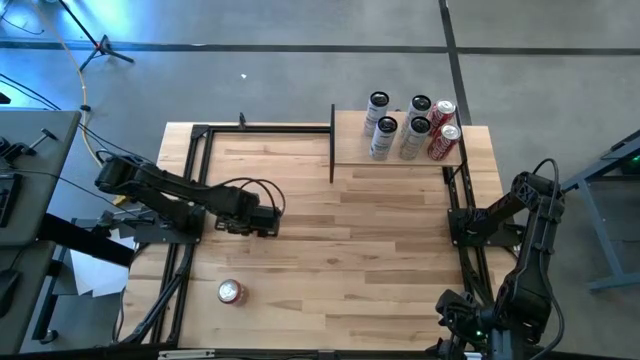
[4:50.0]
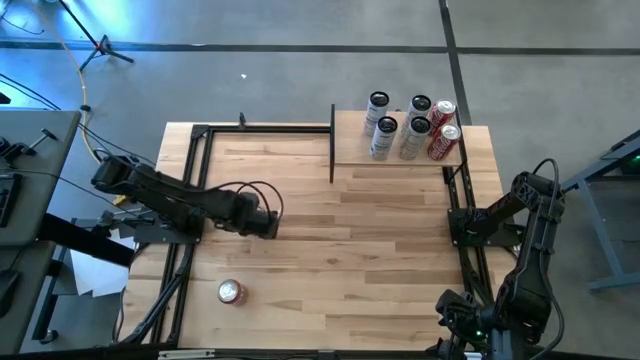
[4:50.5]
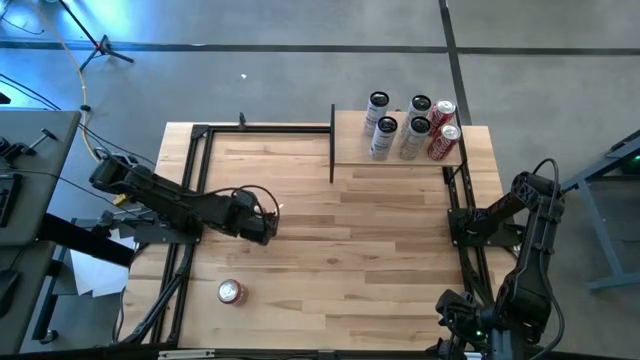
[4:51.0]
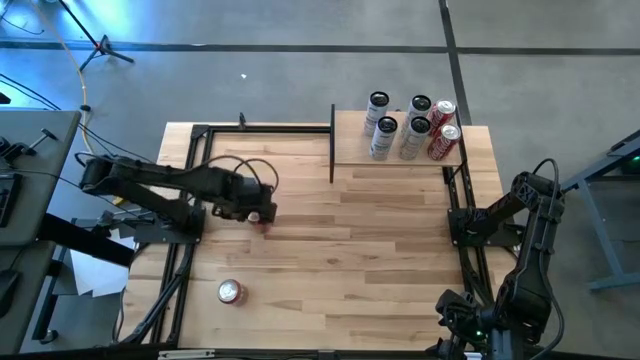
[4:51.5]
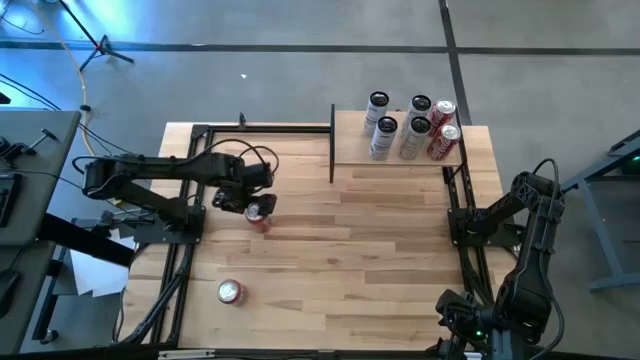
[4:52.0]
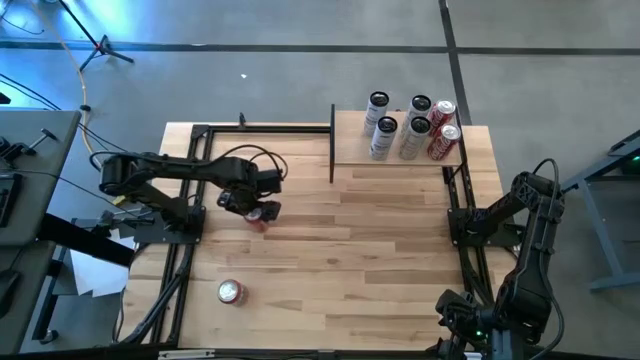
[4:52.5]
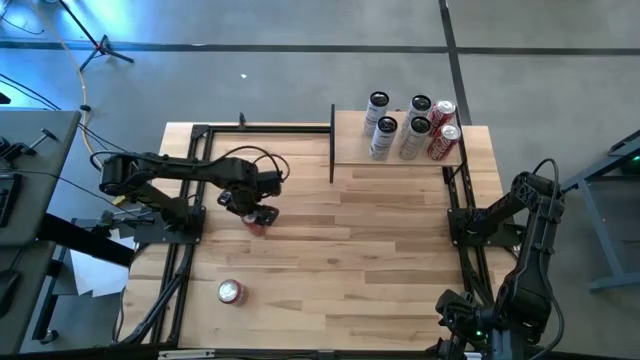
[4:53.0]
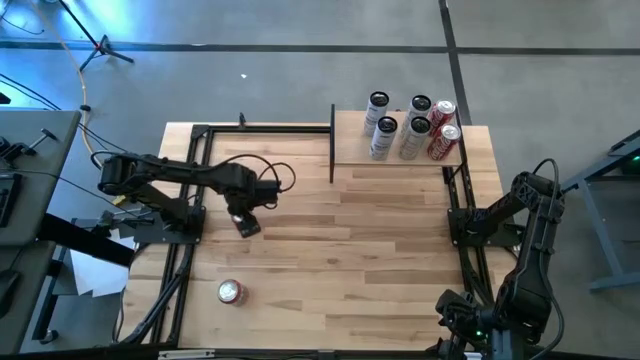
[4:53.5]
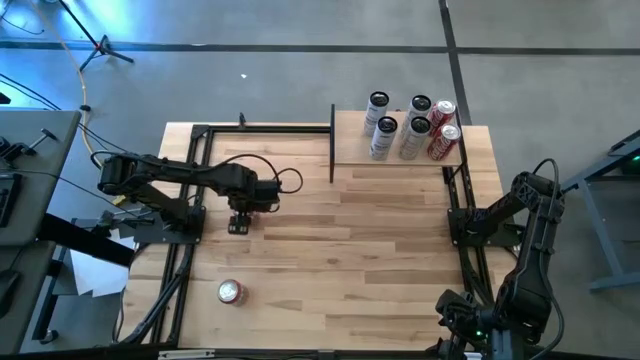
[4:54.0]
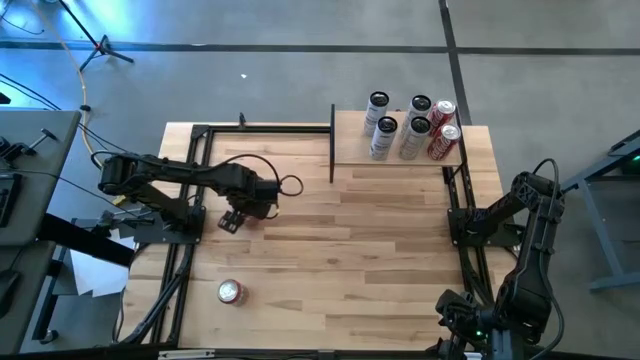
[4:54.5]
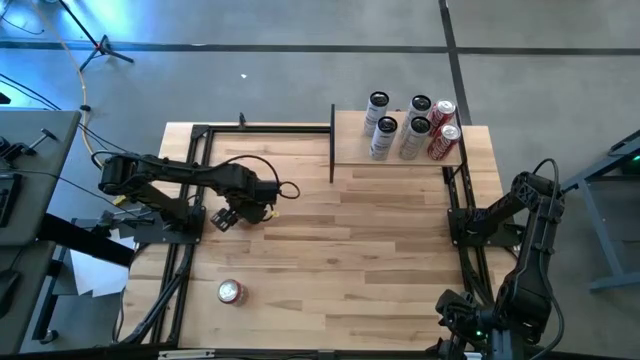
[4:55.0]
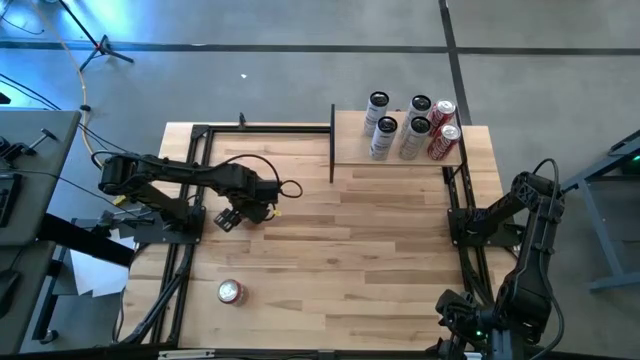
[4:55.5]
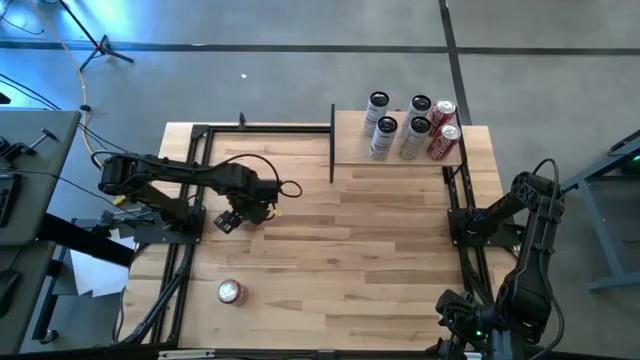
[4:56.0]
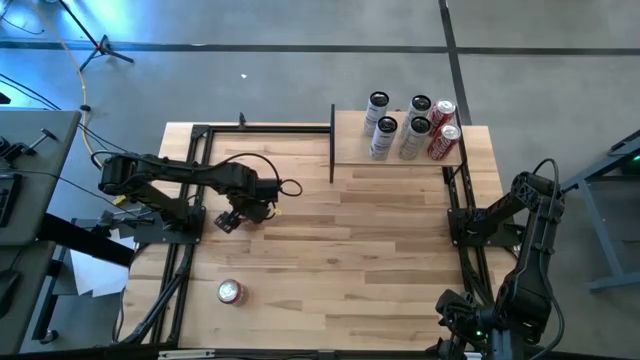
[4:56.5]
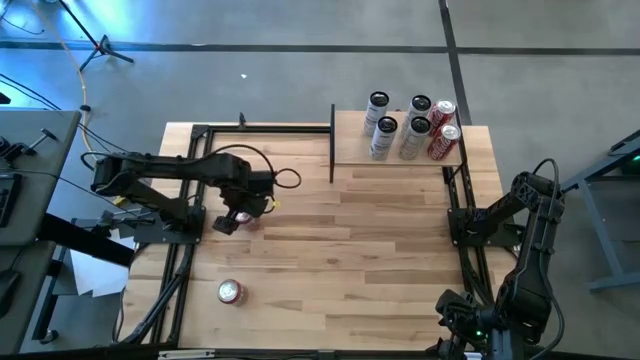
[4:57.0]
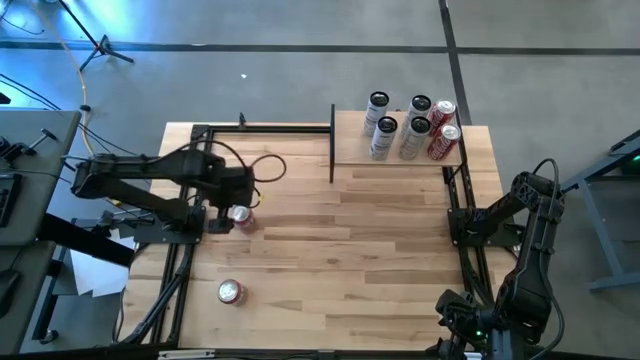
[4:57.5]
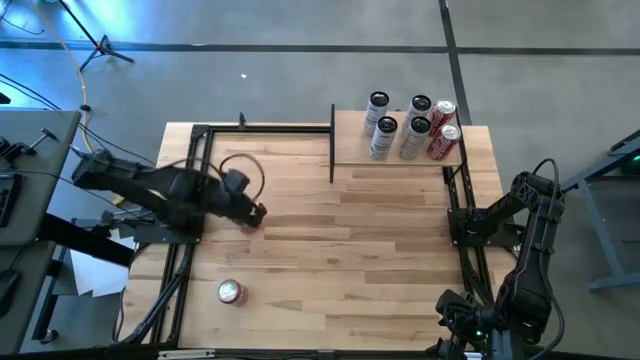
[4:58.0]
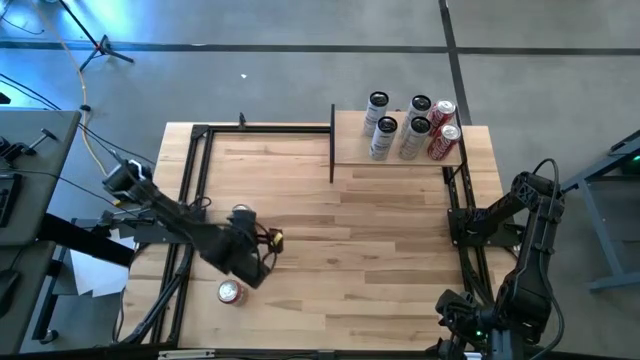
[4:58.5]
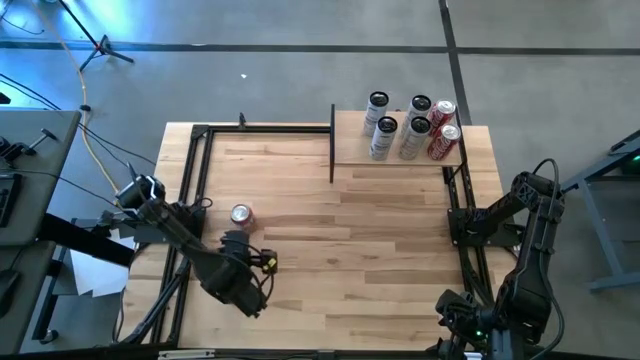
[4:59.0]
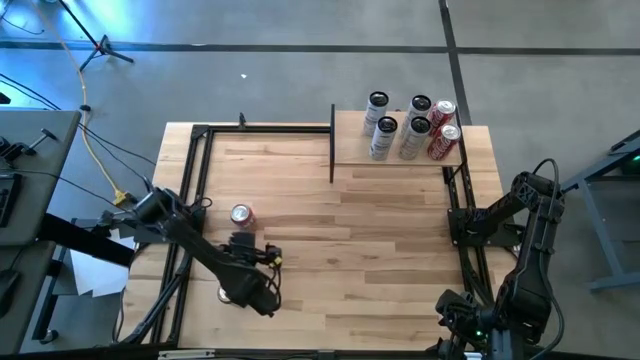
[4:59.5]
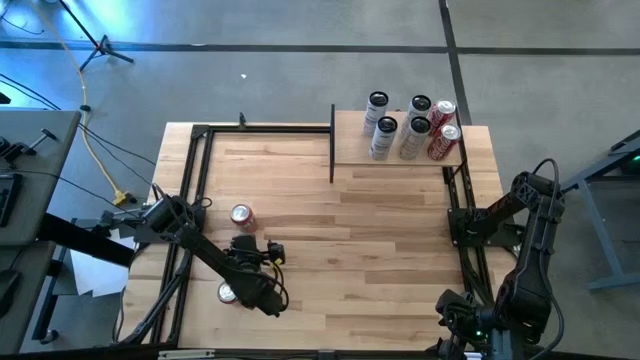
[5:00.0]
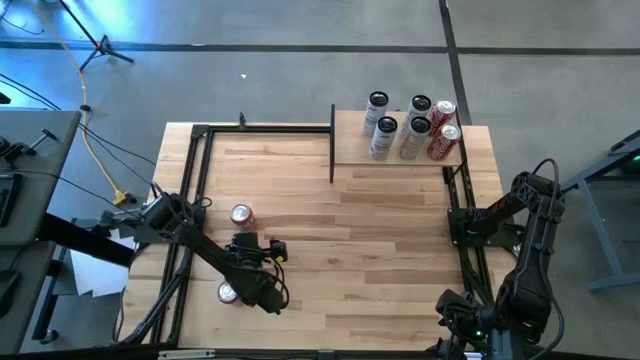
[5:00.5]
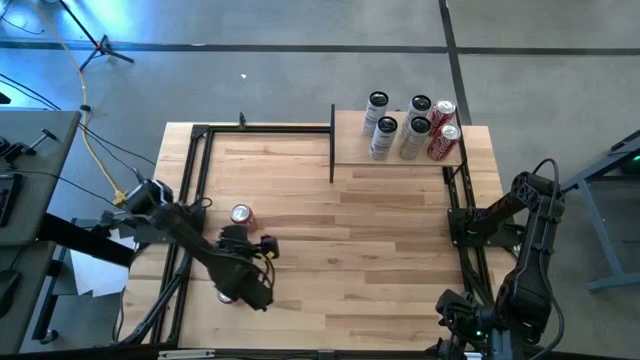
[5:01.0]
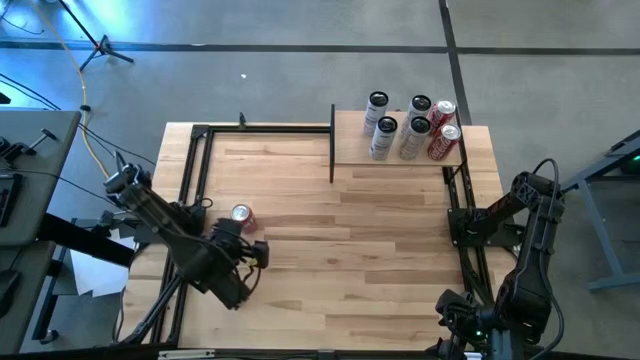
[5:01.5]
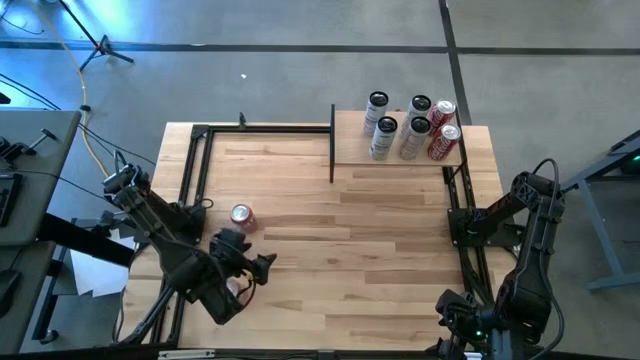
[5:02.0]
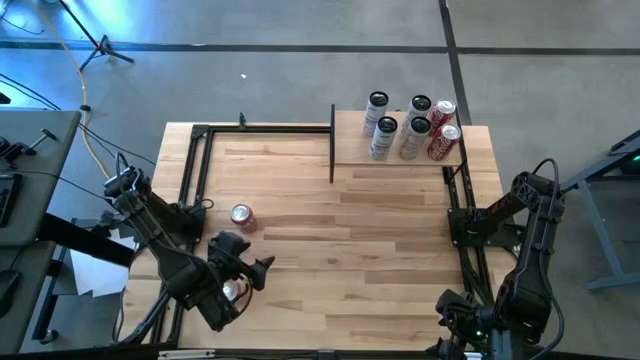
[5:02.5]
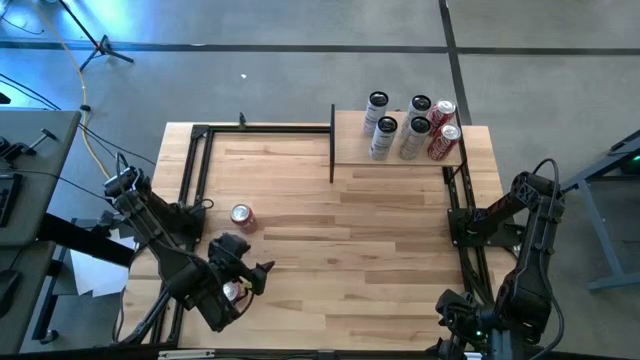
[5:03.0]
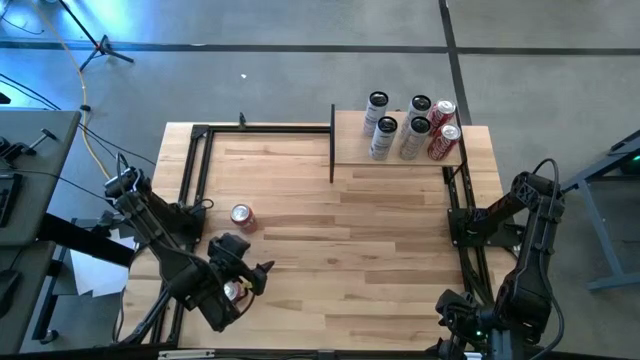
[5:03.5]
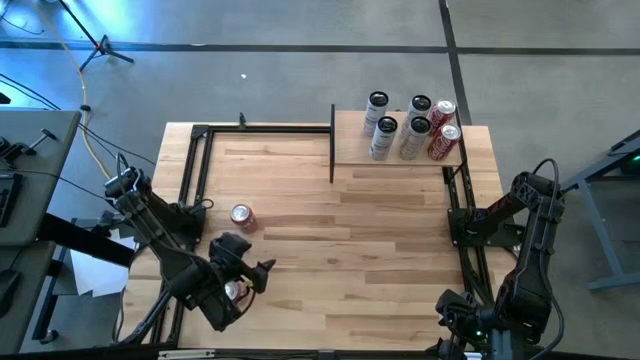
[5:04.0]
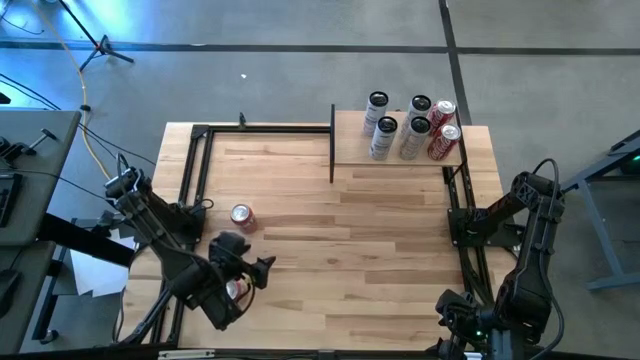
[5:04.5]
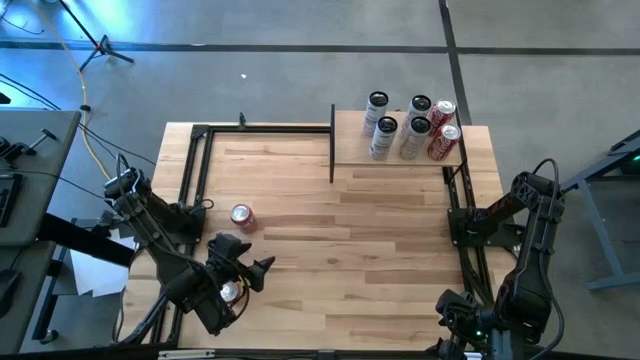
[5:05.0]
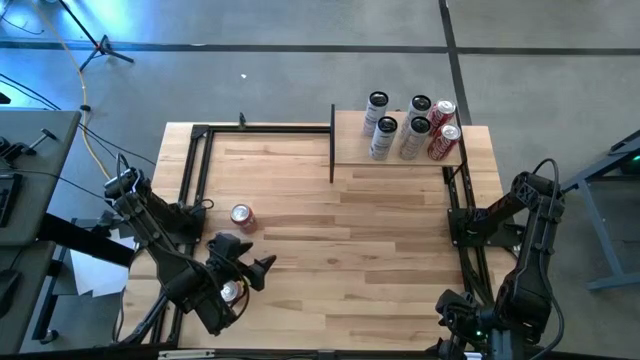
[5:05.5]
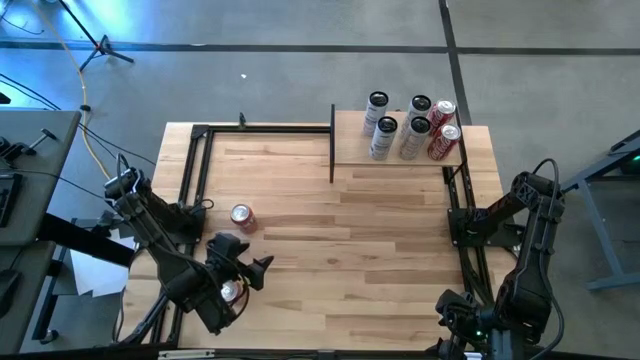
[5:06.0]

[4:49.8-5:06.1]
Task: Place canned beverage on shelf
Put the orange soda can on the shelf

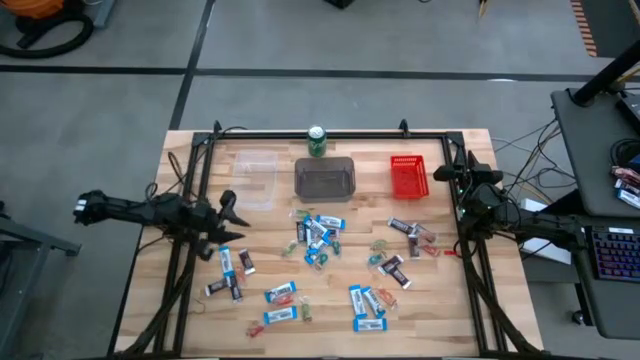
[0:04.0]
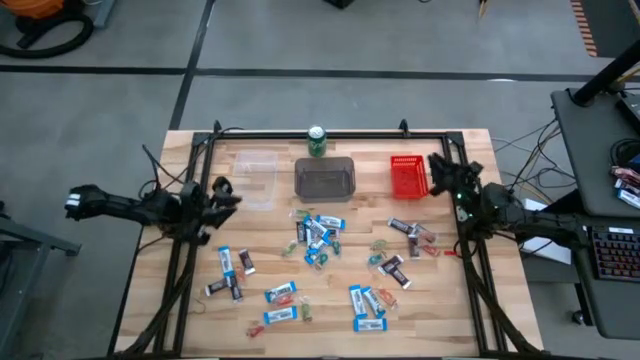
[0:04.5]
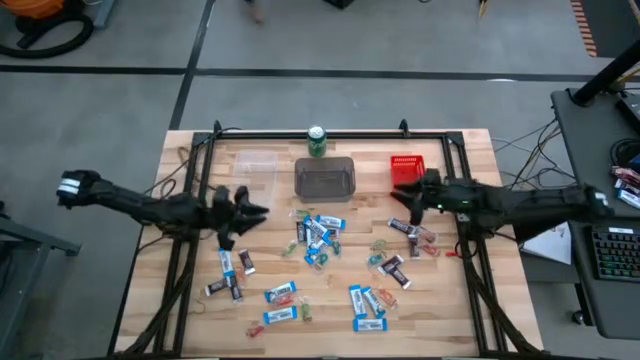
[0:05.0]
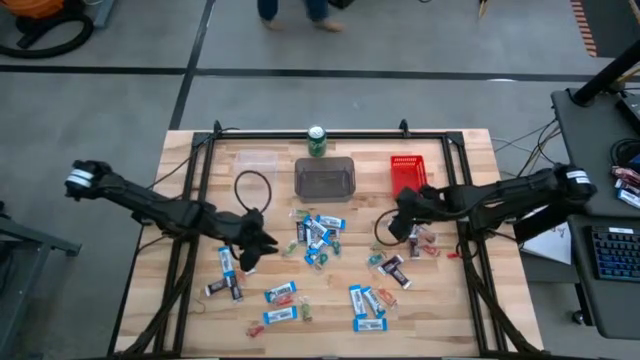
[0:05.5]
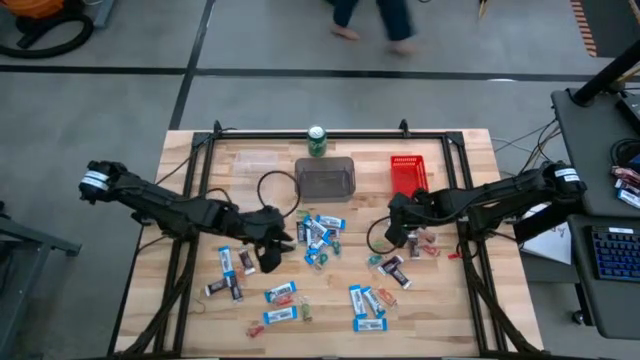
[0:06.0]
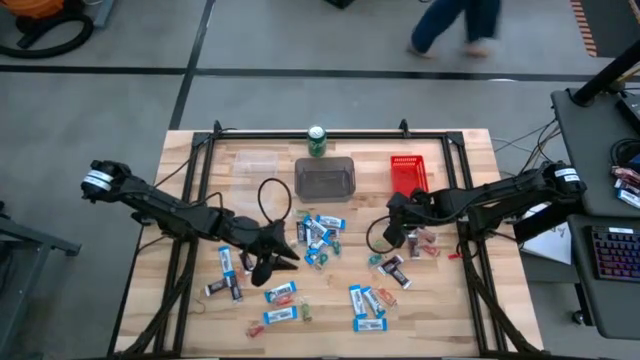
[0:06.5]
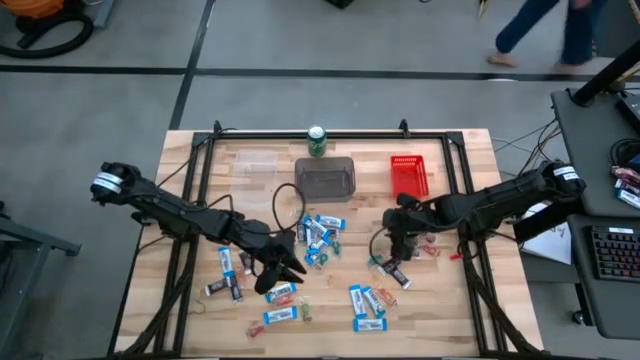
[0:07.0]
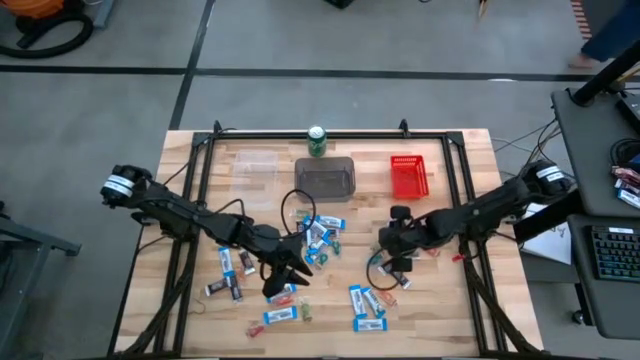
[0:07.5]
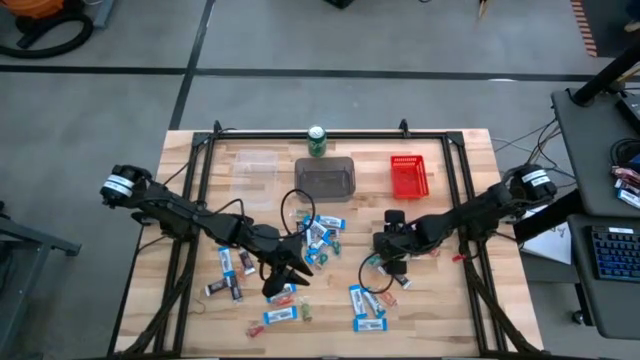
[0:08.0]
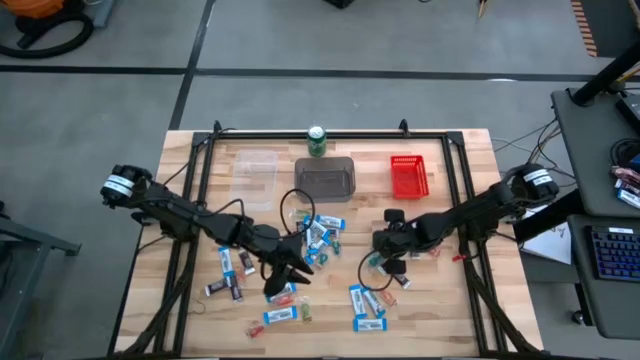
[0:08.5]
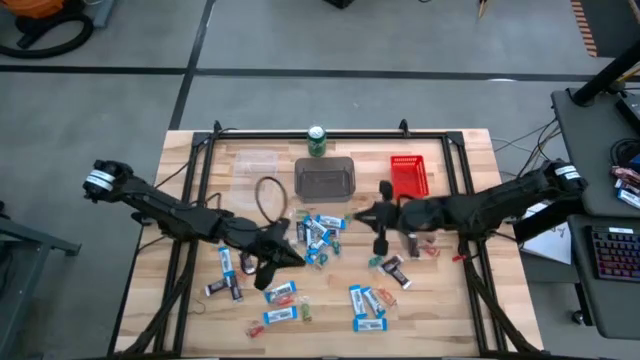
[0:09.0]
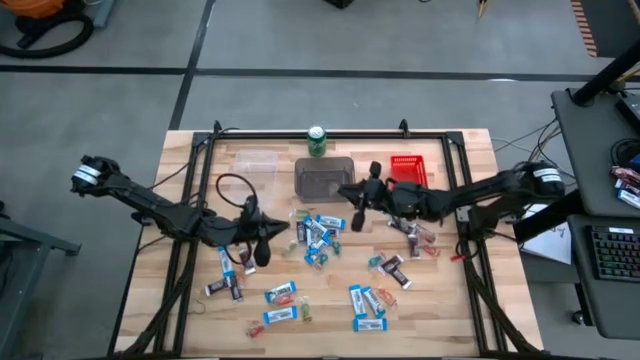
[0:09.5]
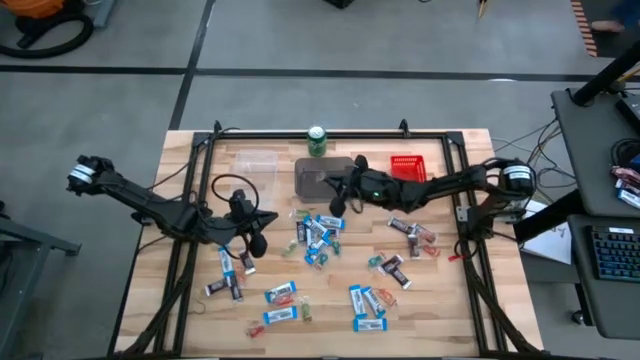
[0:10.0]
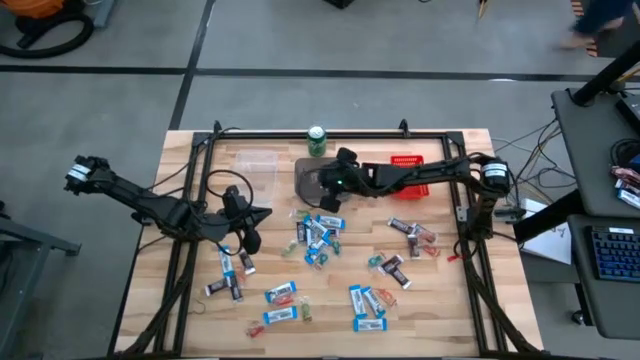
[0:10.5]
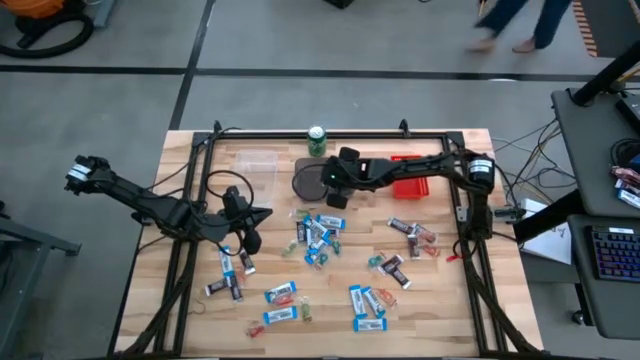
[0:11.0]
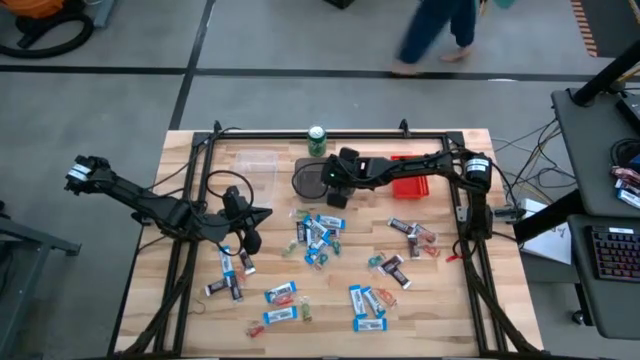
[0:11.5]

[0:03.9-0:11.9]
Task: Organize candy in baskets
Put the green gummy into the black bin
